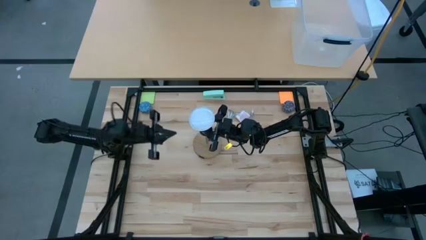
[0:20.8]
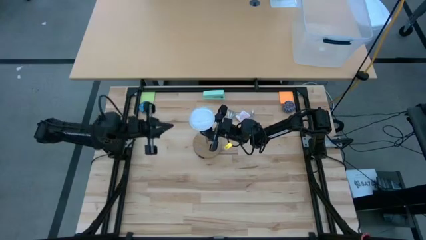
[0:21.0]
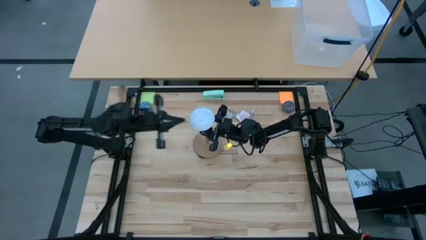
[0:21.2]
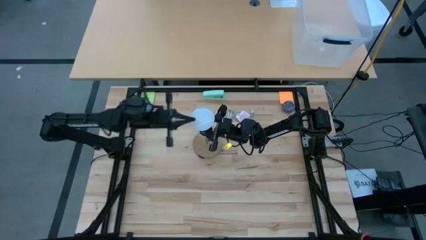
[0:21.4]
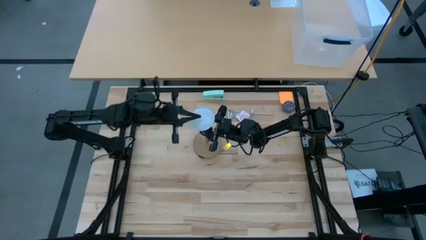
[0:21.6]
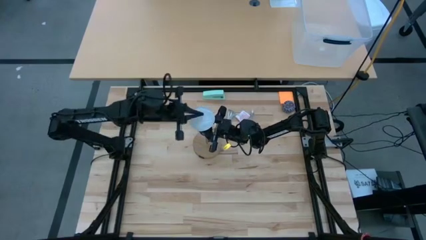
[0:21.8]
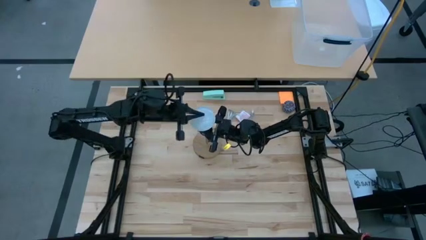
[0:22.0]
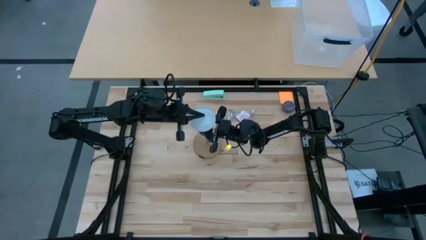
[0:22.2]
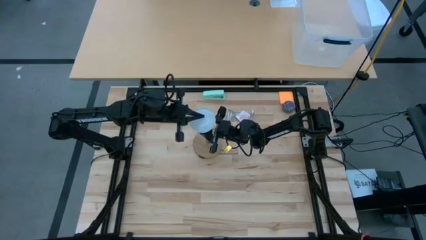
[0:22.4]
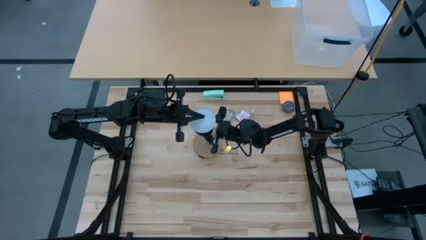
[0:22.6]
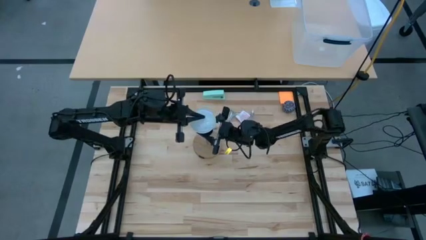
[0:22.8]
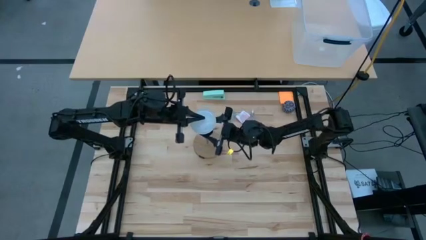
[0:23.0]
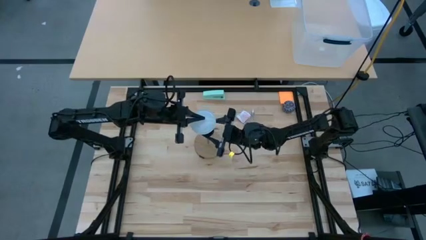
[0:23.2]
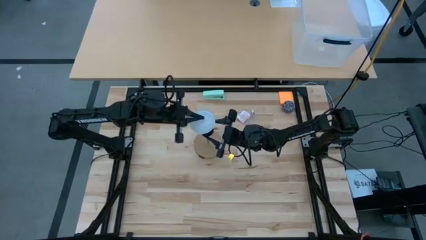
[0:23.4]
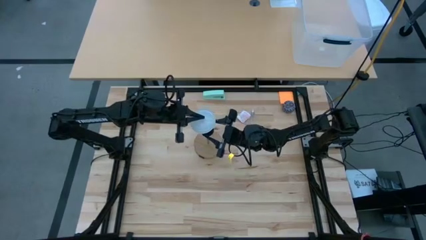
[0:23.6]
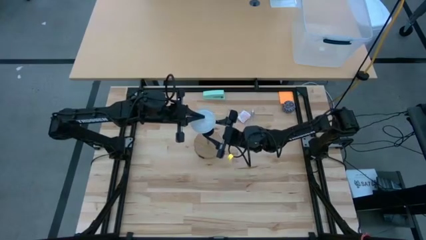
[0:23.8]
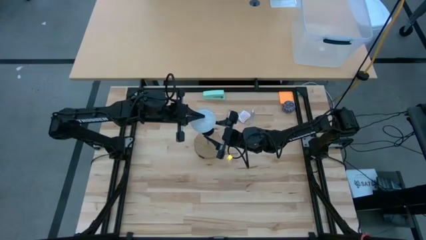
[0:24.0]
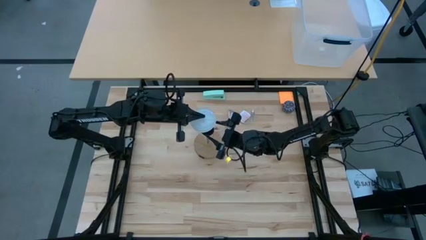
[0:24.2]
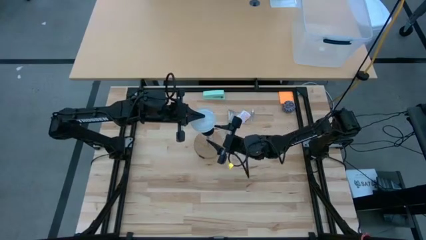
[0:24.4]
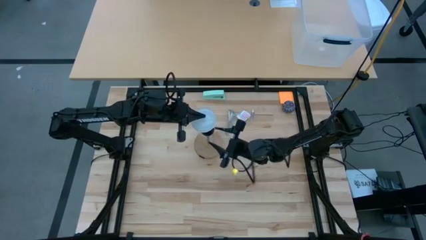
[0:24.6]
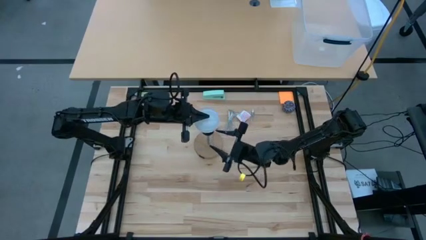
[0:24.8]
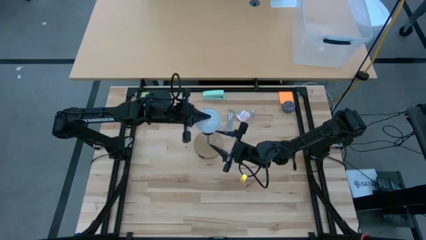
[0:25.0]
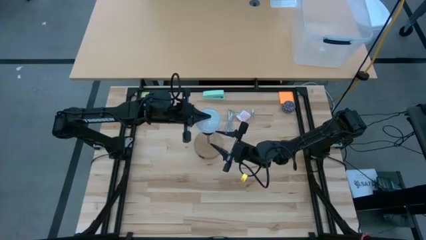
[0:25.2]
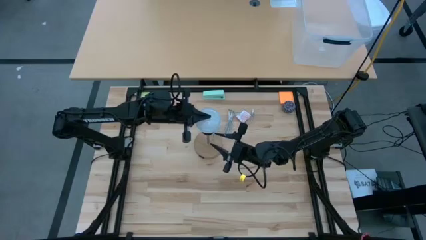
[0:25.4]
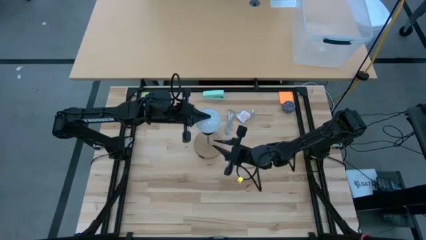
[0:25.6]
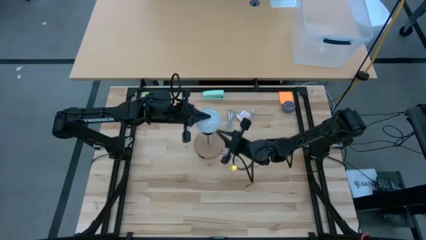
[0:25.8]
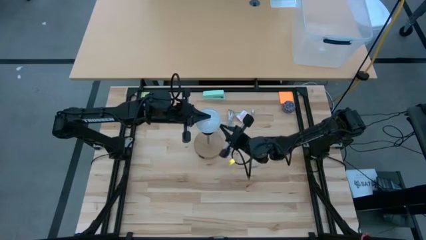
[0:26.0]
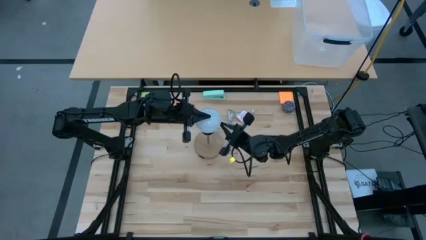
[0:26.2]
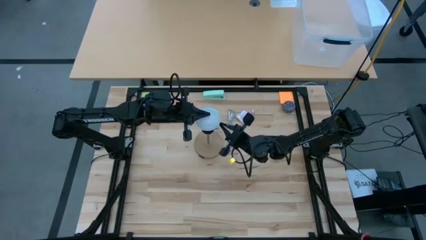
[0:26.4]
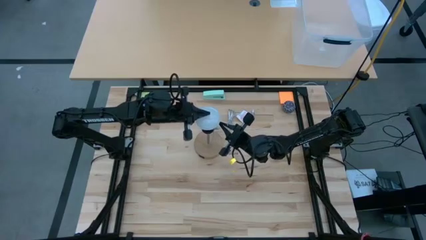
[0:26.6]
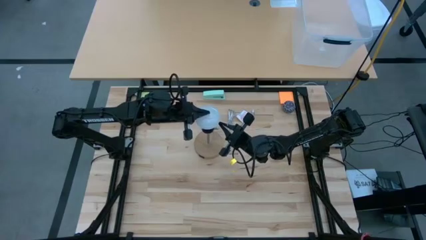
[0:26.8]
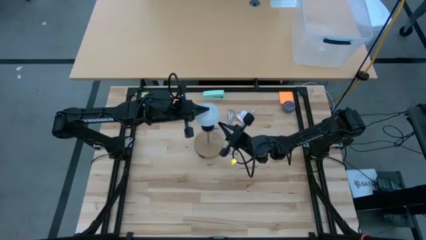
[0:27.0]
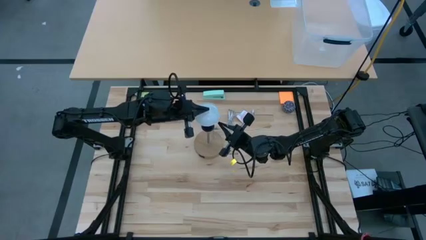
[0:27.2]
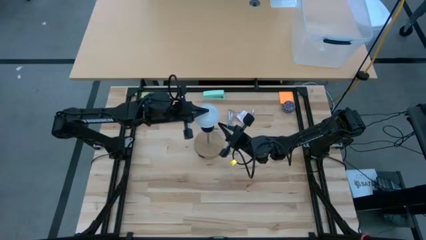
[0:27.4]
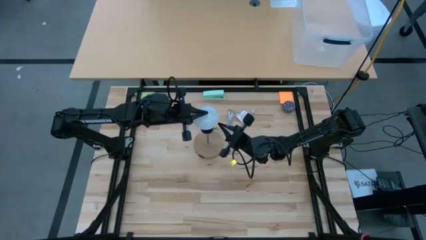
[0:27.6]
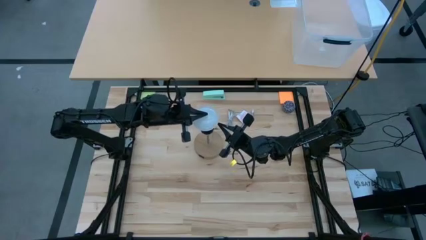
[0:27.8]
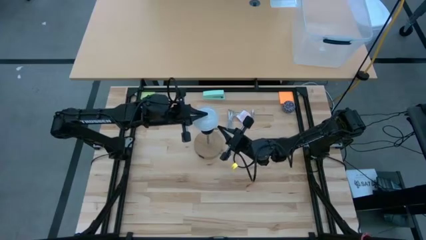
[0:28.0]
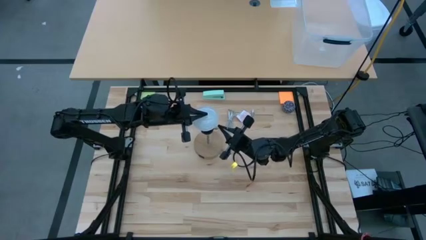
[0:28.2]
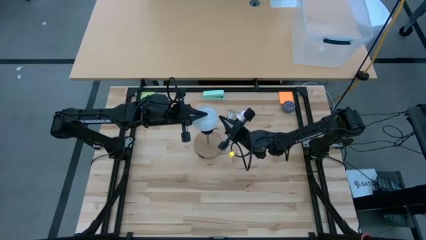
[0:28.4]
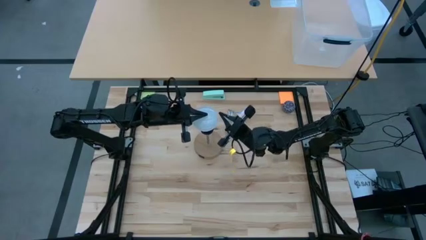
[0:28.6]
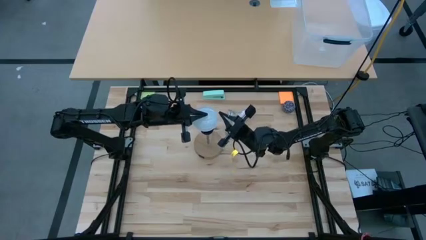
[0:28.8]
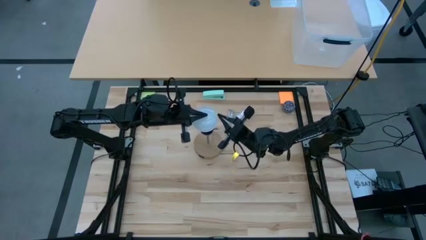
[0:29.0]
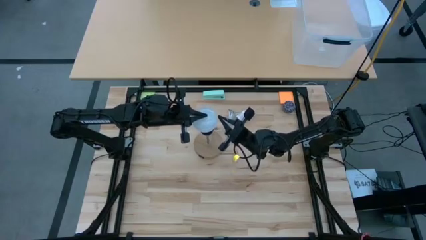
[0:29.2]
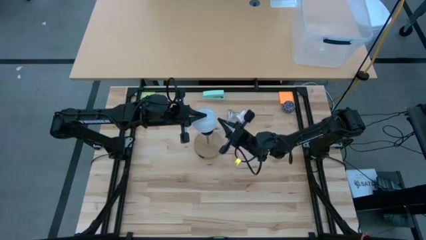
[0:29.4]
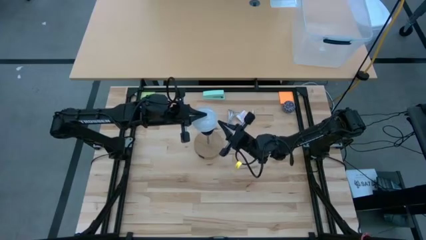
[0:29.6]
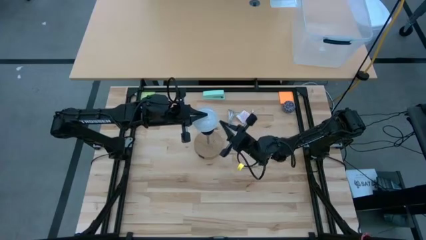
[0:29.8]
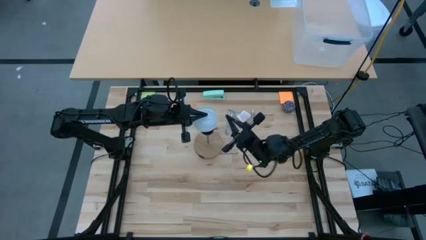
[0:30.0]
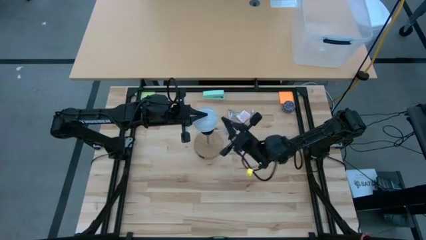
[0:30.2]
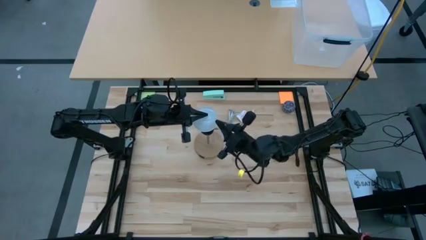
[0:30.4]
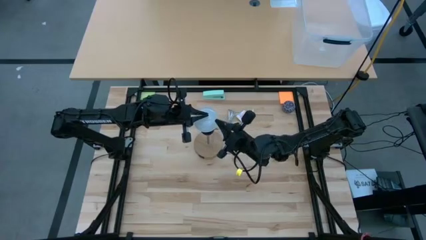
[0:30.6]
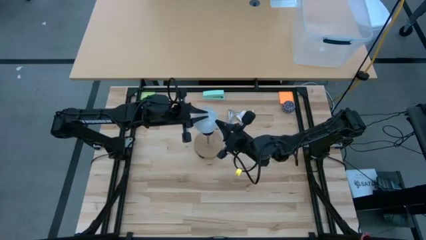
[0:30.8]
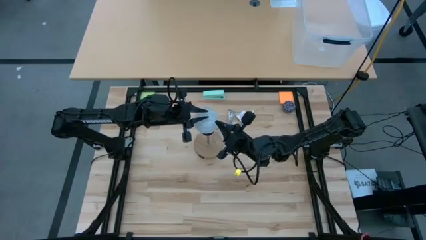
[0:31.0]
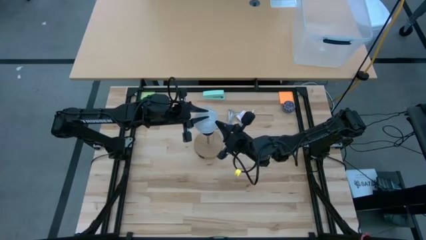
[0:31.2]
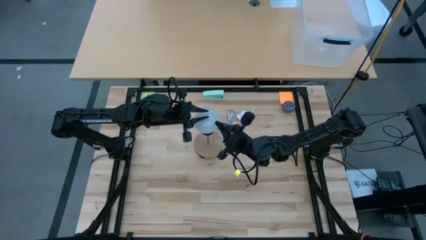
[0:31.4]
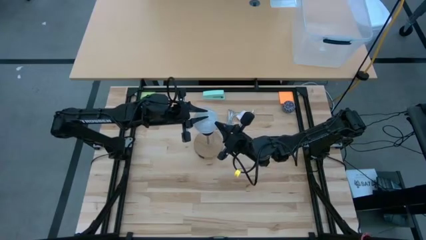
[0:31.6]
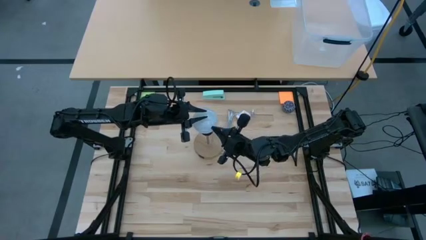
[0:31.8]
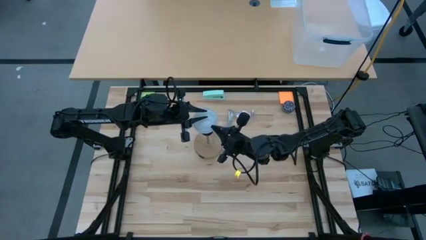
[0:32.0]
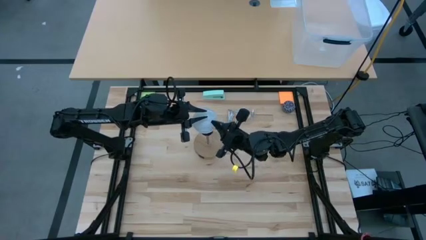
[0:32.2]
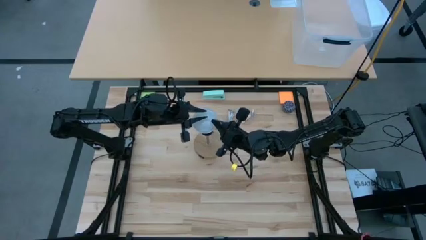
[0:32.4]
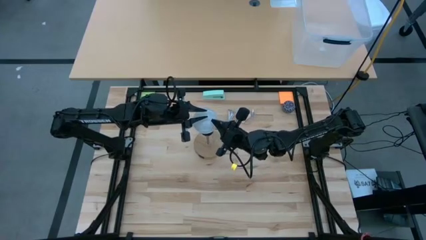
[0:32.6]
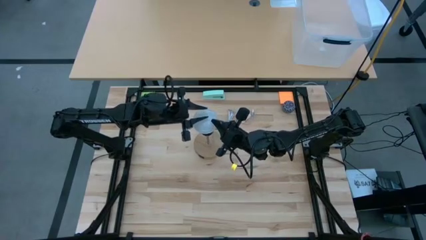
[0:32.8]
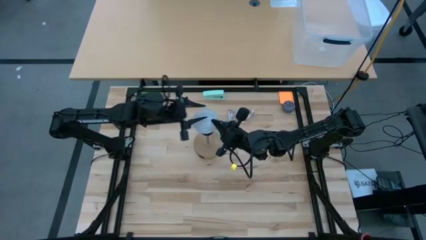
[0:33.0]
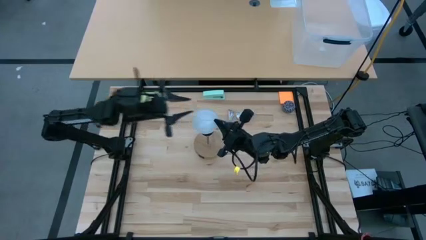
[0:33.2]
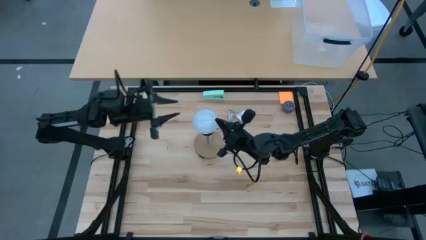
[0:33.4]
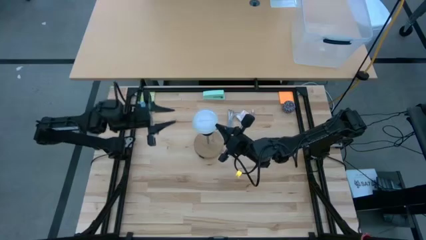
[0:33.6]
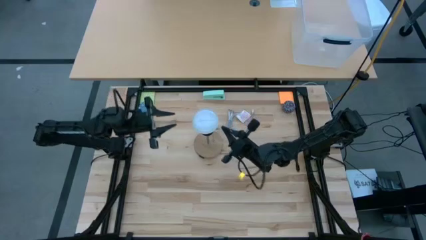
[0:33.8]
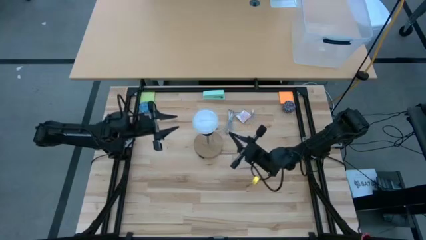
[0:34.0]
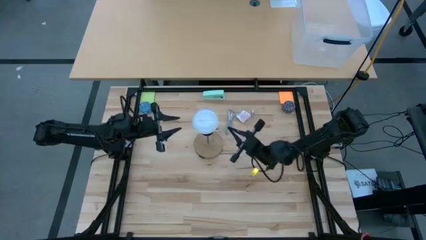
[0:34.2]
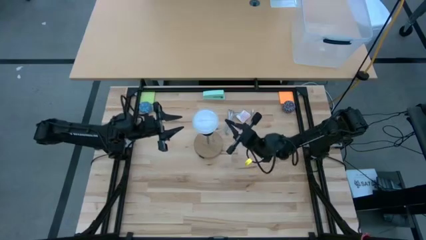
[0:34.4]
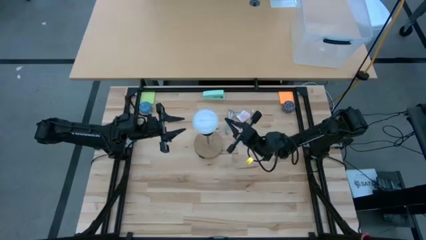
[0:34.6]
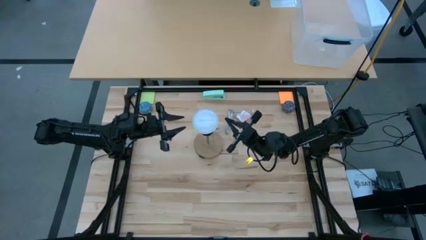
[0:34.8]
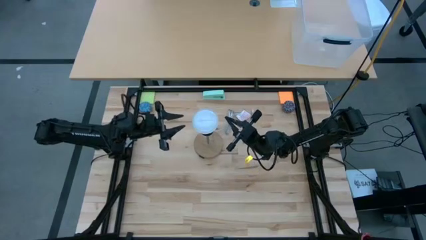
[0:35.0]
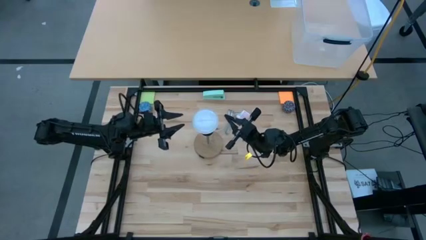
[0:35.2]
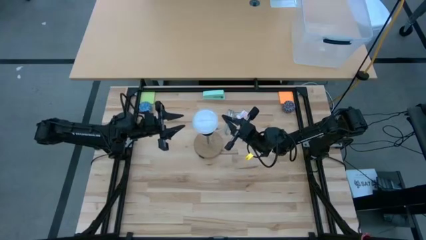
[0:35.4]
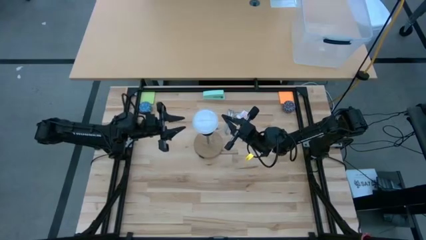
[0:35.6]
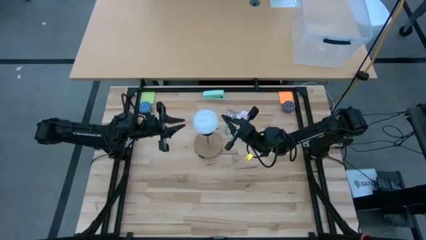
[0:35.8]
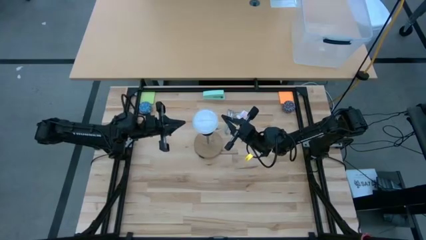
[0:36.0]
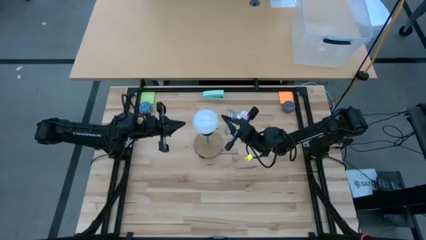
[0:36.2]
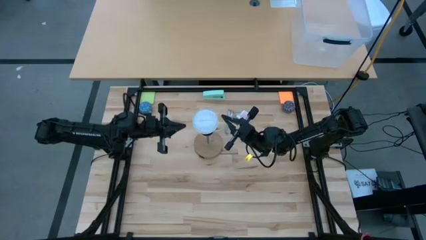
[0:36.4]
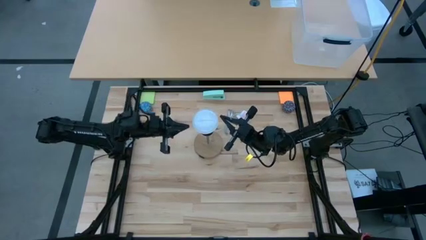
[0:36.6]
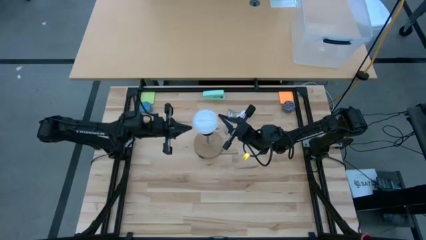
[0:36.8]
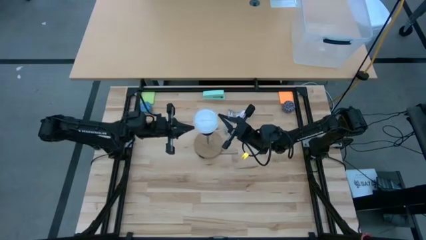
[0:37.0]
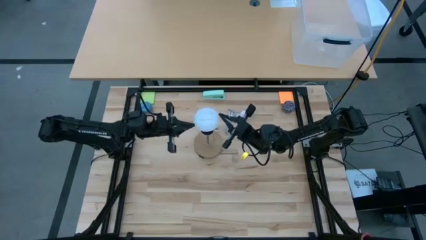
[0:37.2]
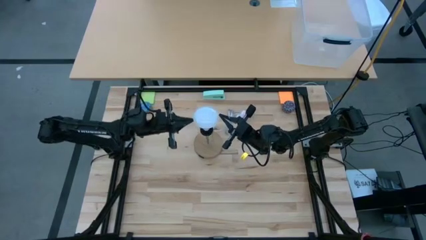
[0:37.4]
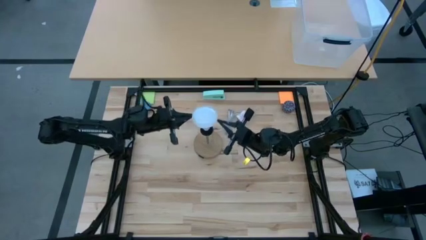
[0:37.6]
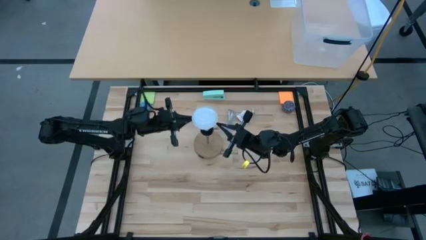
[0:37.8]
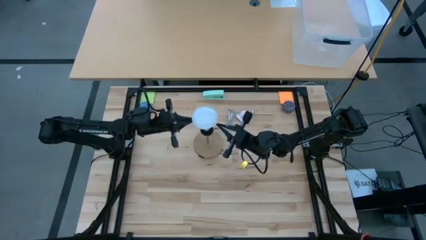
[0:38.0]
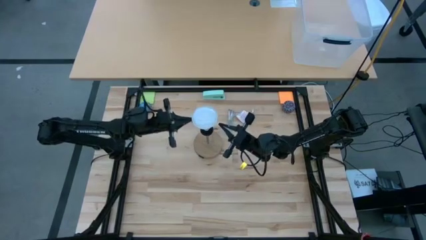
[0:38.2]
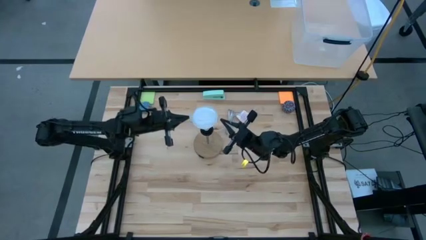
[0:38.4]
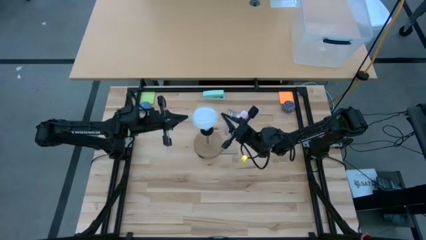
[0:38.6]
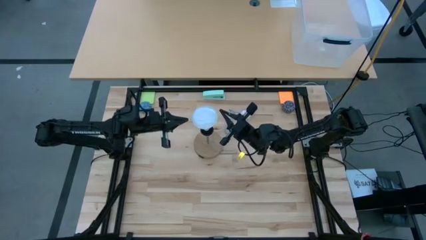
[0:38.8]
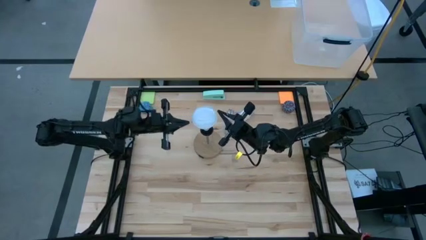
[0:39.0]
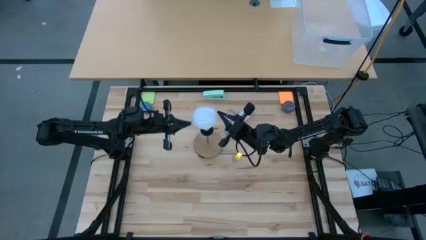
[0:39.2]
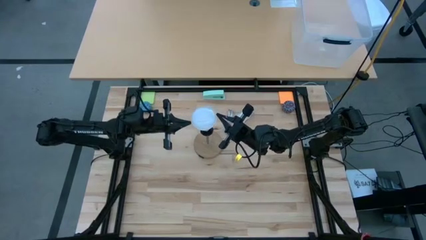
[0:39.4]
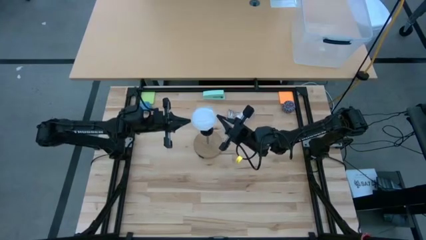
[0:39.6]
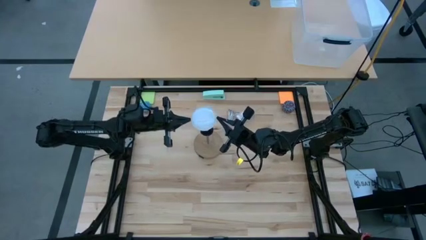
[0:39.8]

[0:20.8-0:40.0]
Task: Screw lightbulb
Insert the lightbulb into the lamp socket
